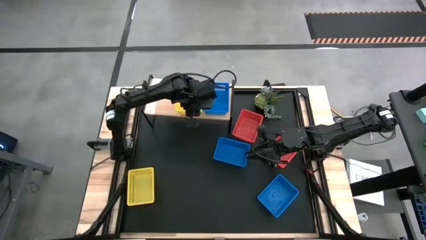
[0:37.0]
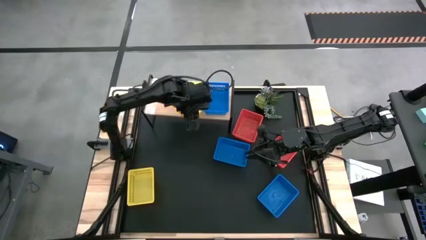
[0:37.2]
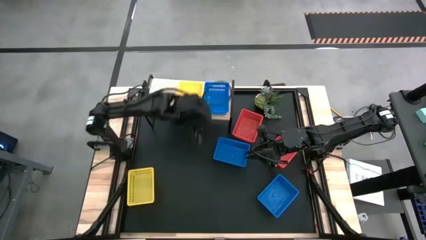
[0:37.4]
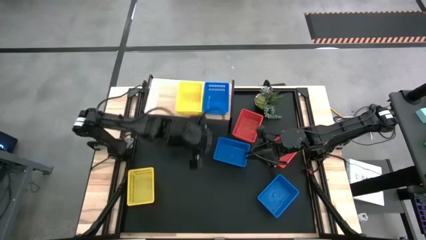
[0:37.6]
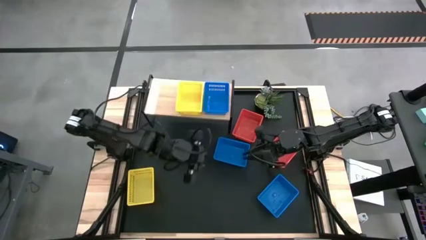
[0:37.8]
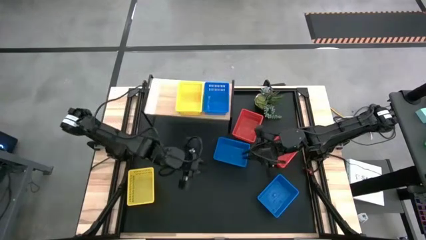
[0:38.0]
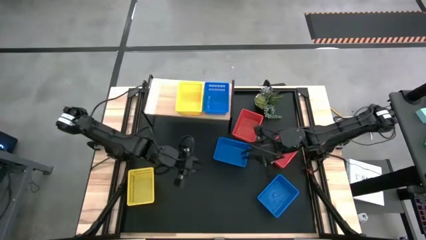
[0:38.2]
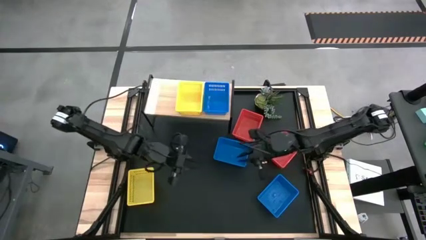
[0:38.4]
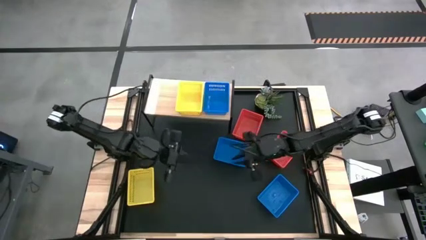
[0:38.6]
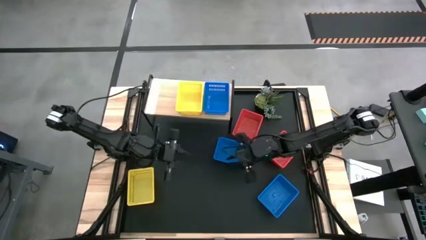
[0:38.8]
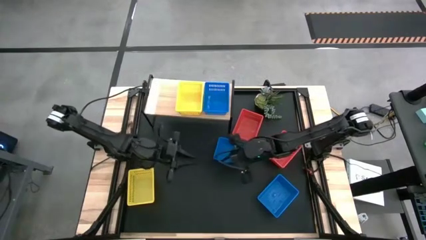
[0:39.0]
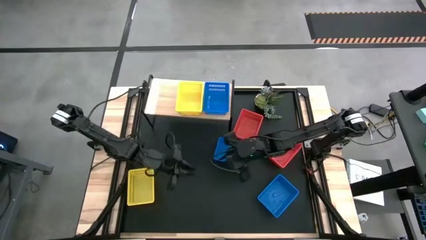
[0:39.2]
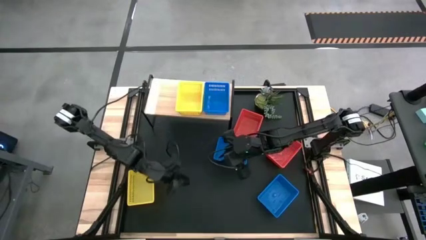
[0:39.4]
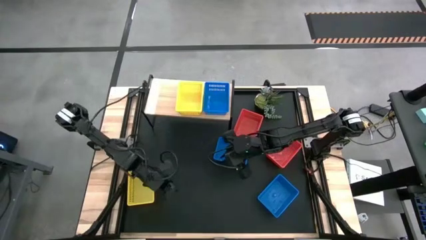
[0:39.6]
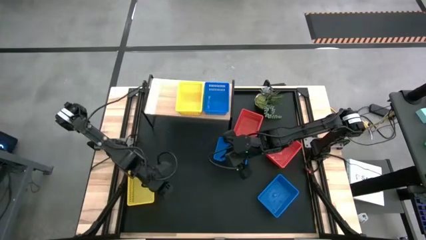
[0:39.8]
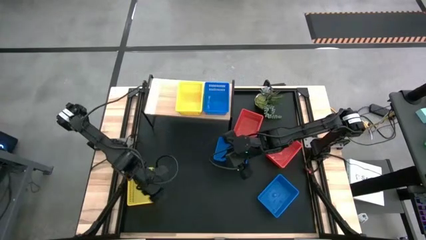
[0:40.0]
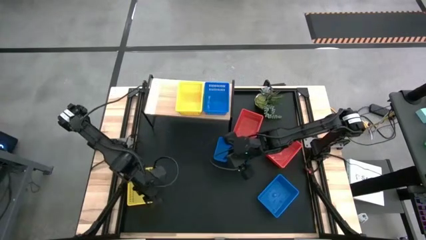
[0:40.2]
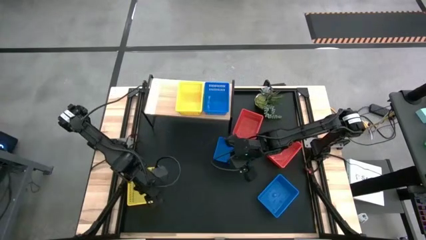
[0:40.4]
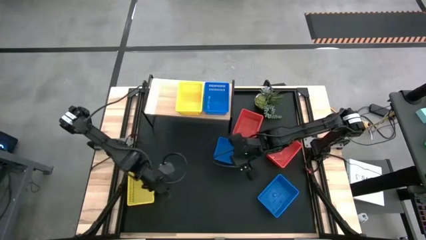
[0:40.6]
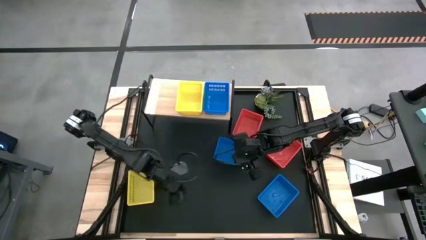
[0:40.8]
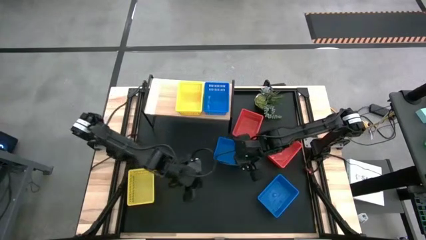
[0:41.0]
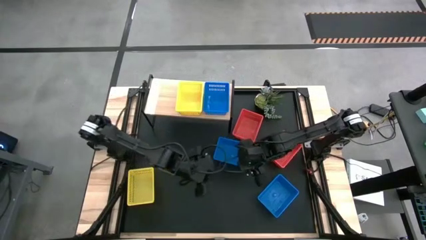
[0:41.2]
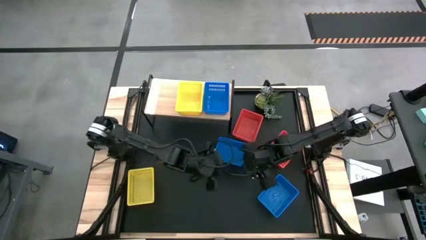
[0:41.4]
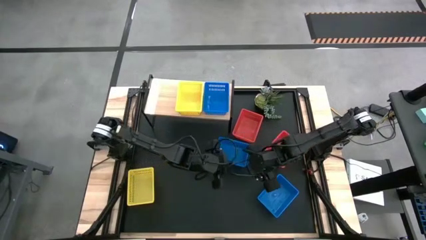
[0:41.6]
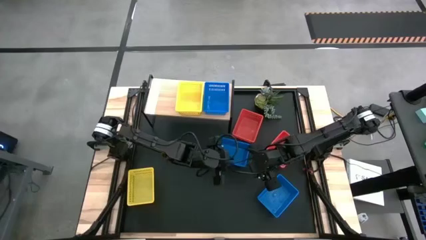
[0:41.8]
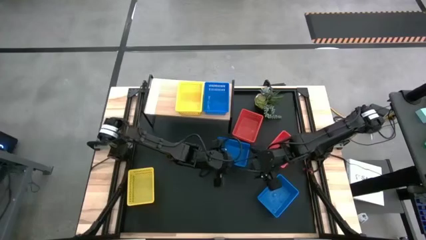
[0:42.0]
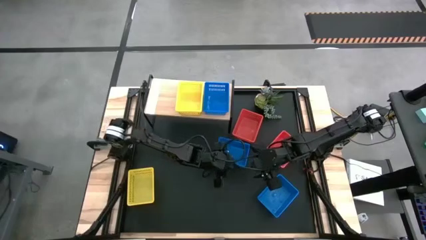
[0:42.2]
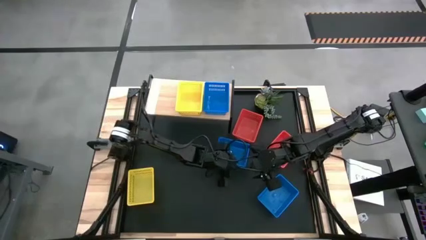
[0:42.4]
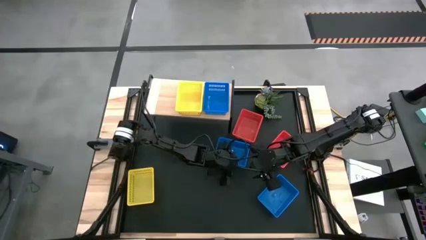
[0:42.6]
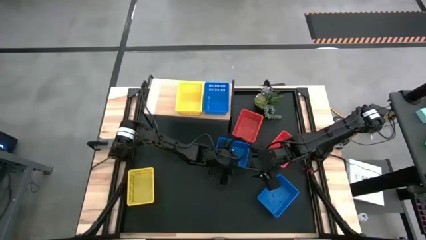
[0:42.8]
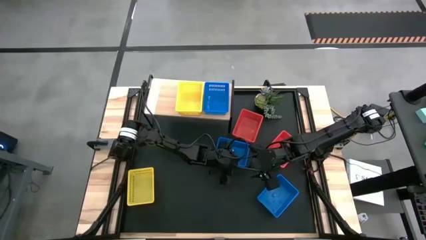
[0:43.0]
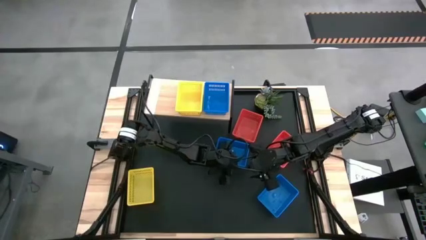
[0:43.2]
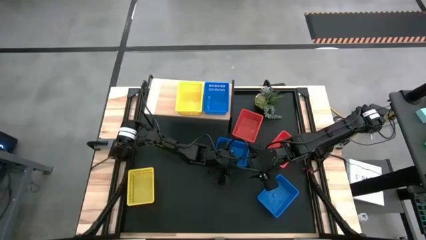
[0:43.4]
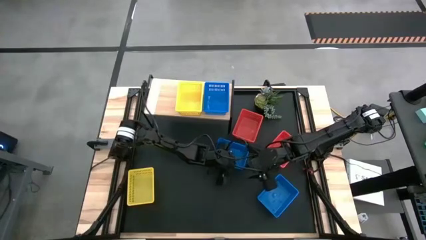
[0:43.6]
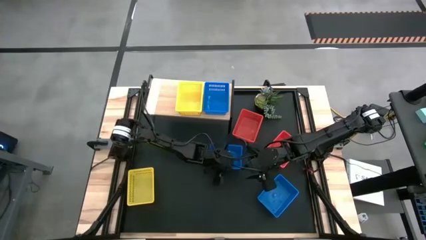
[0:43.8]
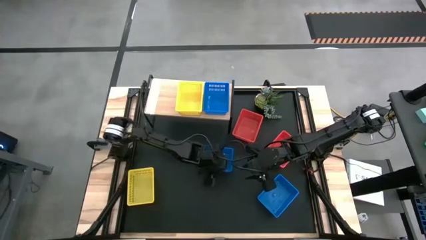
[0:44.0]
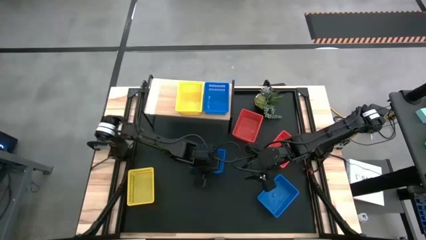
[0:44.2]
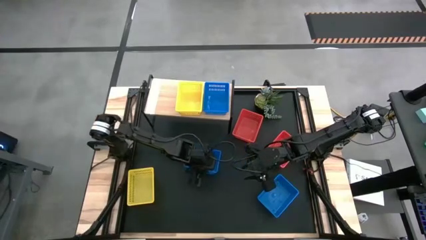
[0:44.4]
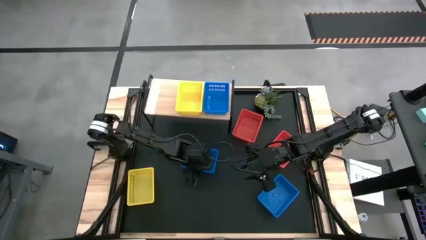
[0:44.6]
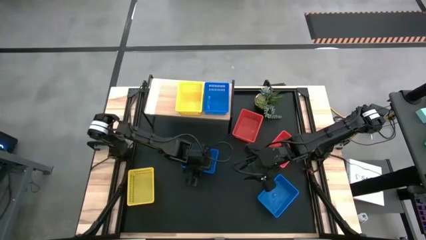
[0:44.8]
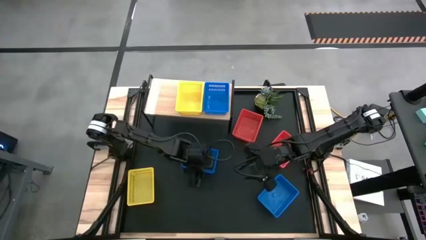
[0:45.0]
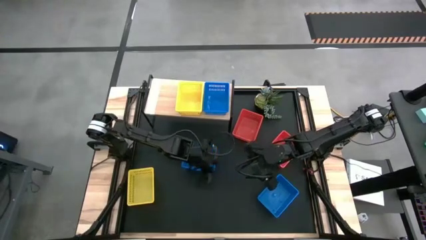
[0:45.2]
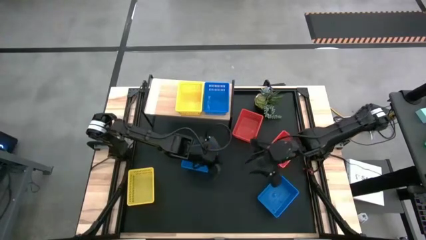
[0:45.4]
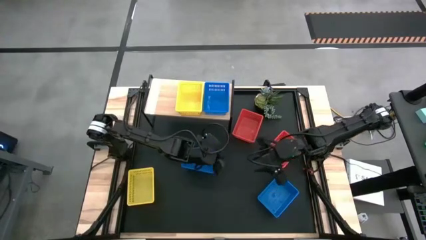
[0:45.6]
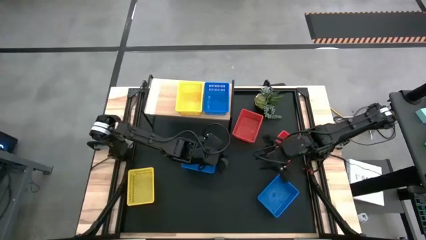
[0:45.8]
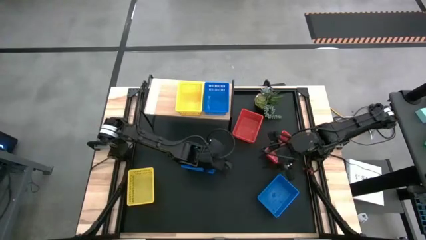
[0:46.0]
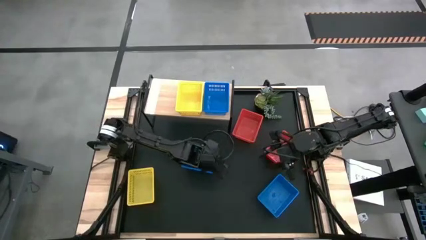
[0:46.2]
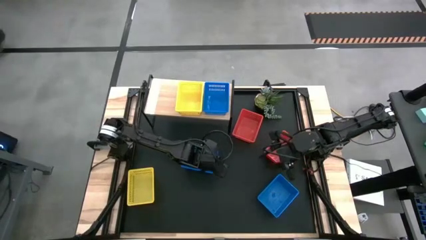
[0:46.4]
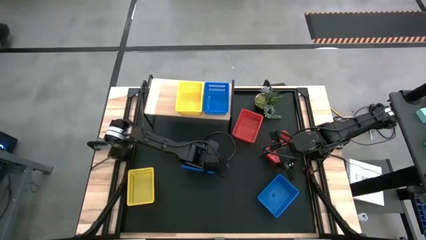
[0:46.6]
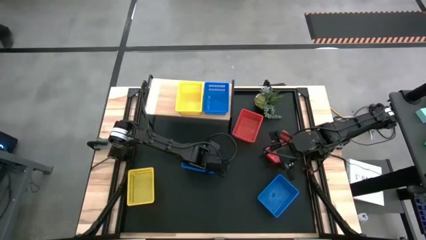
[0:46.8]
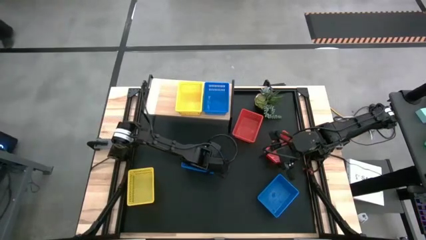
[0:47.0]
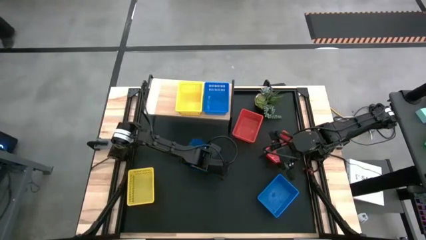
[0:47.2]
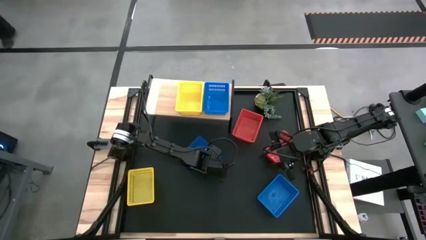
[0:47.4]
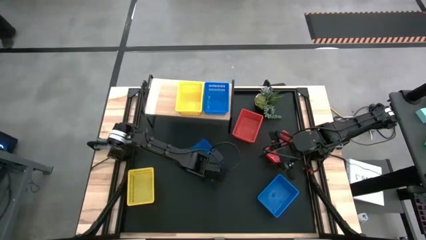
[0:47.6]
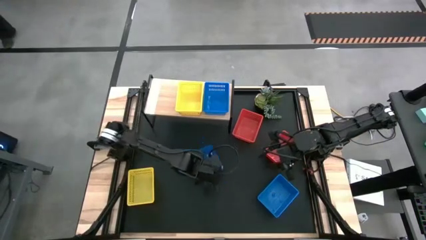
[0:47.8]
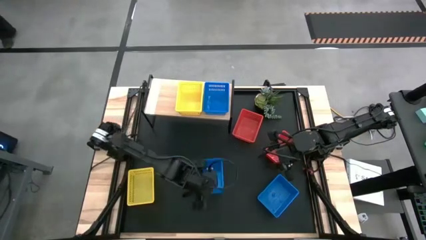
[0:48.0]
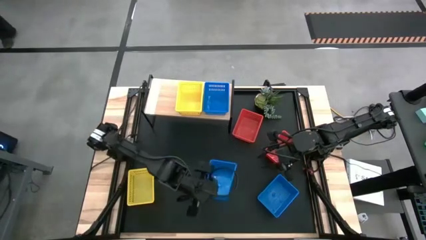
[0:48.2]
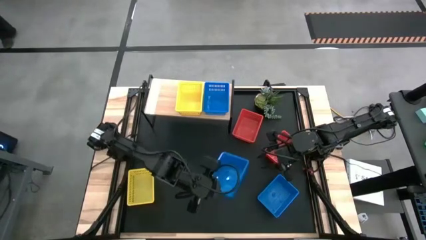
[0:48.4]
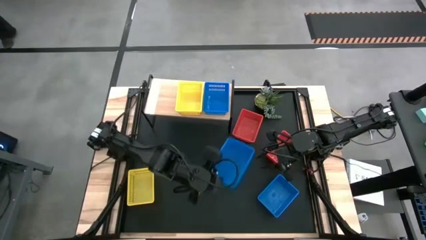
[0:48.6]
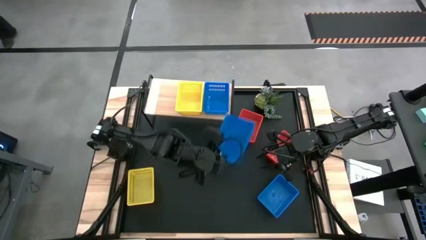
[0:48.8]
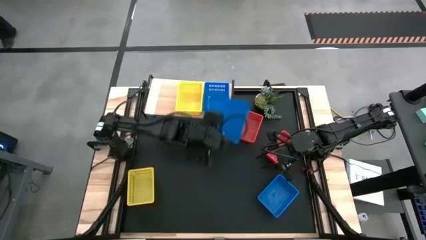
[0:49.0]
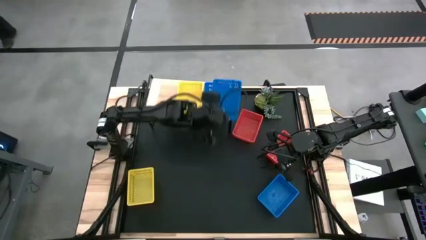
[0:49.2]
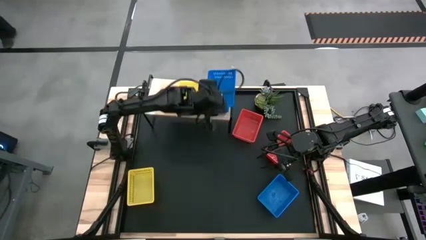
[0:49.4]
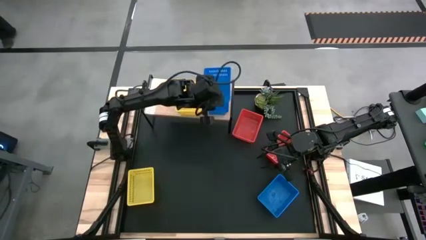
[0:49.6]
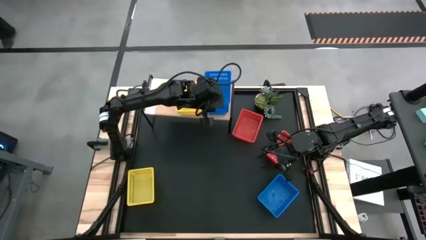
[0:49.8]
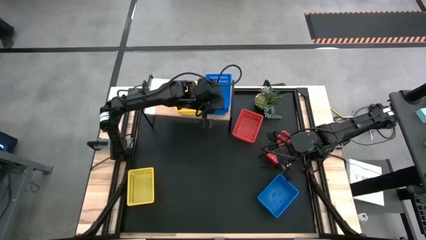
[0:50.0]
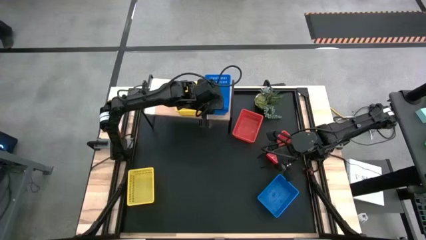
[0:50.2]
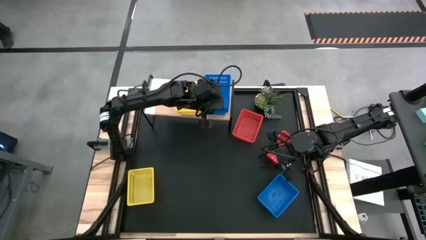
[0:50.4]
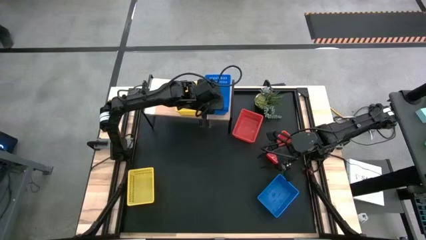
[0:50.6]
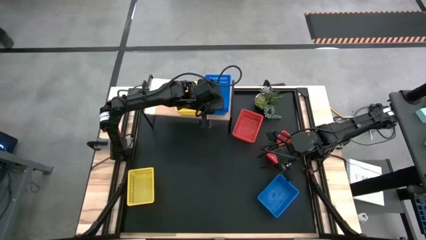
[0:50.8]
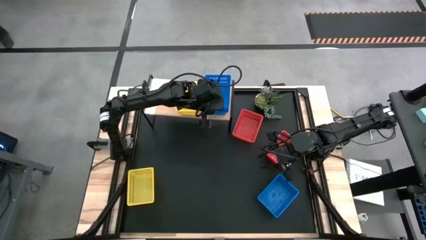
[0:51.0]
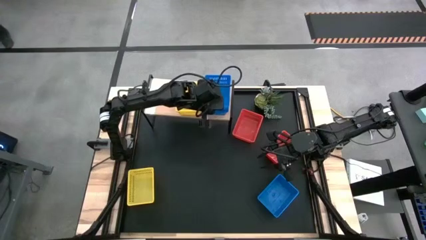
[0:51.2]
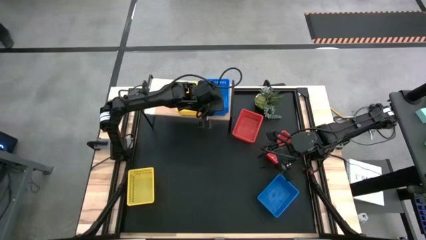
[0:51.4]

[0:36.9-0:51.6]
Task: Stack baskets on shelf by color
Stack the top blue bin on top of the blue bins on the shelf
